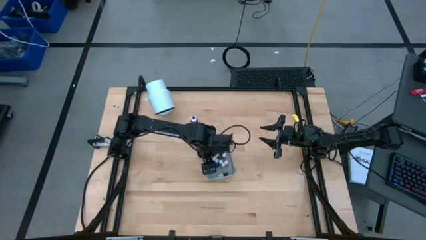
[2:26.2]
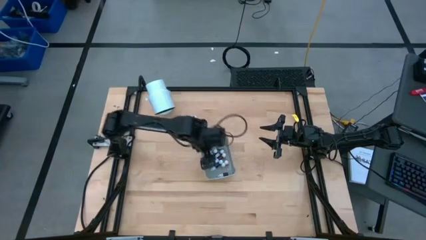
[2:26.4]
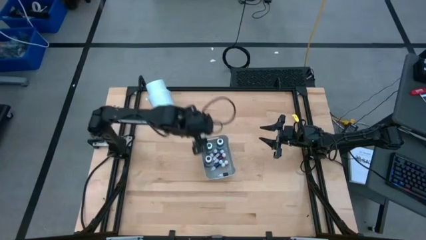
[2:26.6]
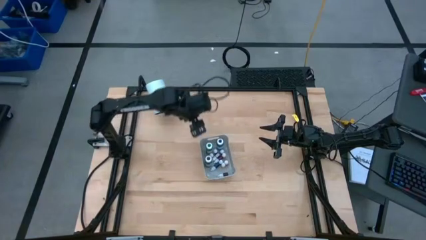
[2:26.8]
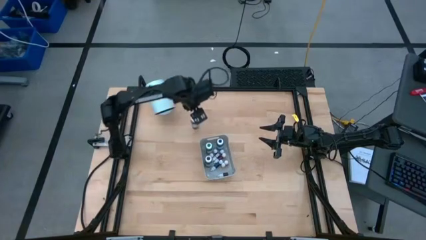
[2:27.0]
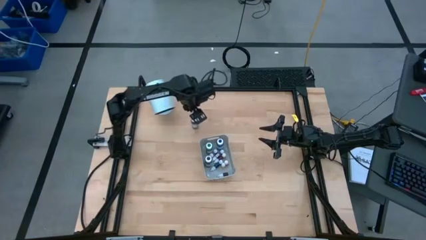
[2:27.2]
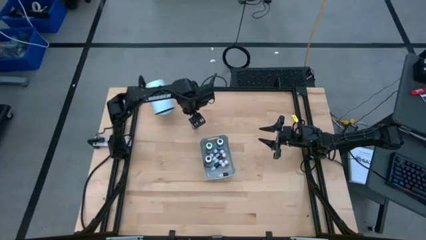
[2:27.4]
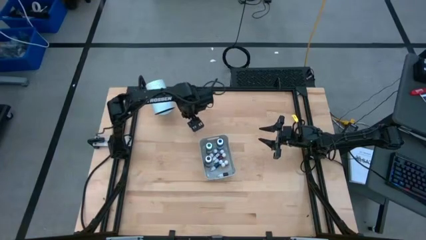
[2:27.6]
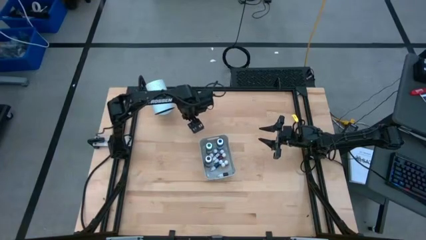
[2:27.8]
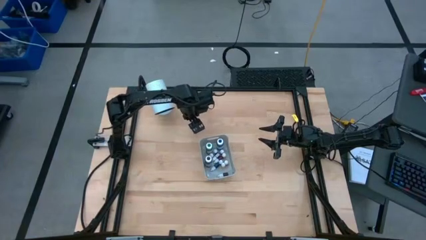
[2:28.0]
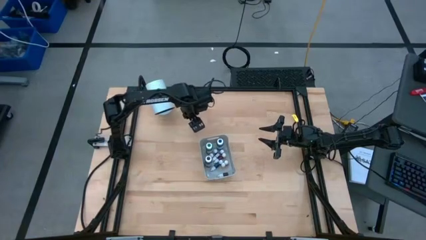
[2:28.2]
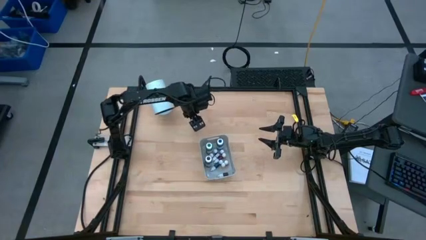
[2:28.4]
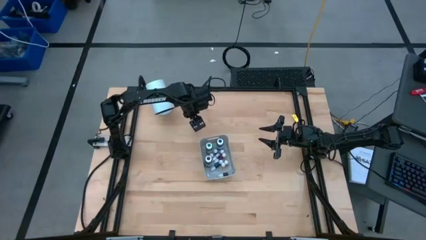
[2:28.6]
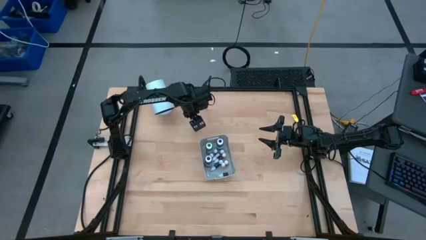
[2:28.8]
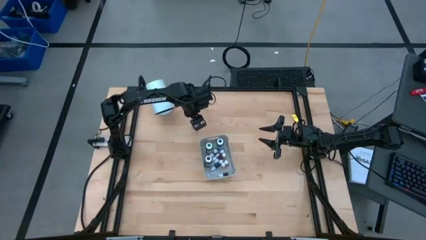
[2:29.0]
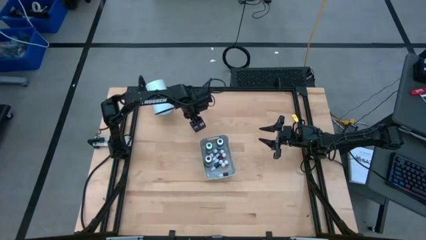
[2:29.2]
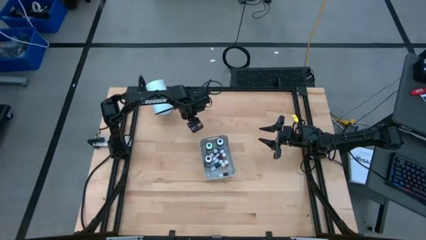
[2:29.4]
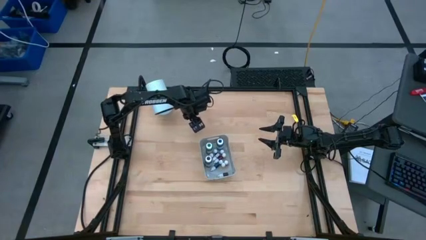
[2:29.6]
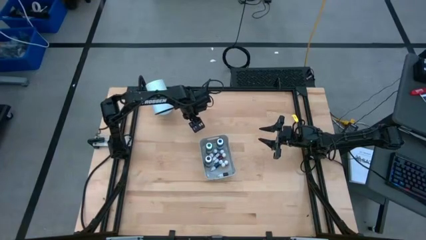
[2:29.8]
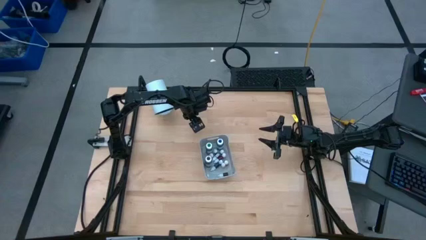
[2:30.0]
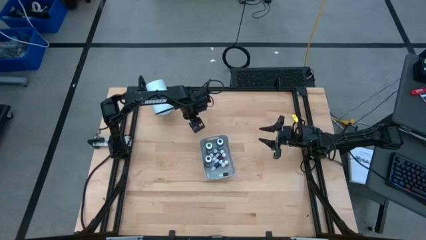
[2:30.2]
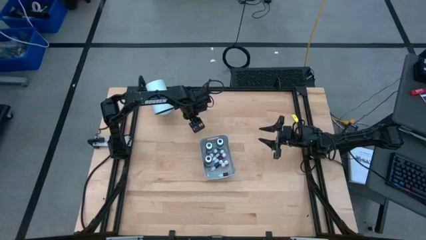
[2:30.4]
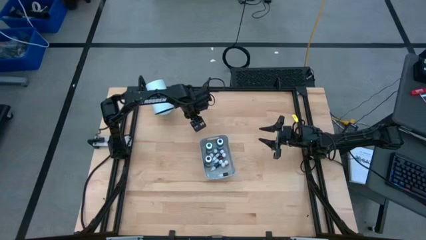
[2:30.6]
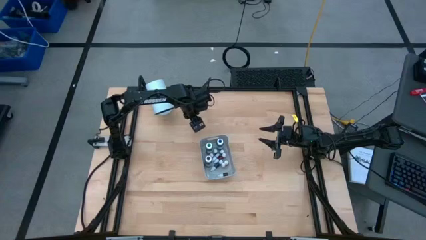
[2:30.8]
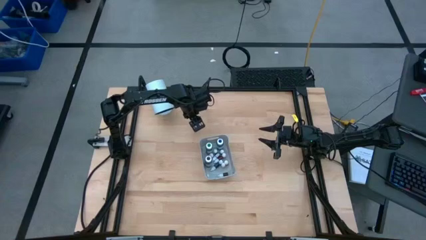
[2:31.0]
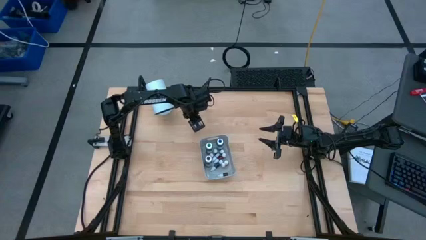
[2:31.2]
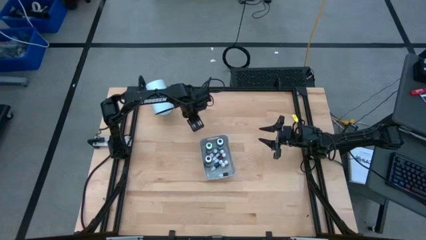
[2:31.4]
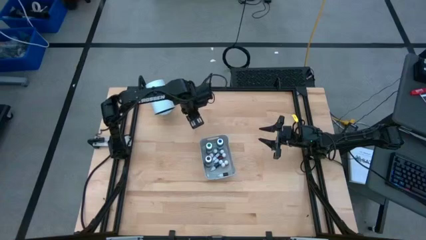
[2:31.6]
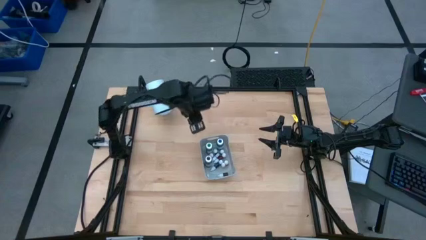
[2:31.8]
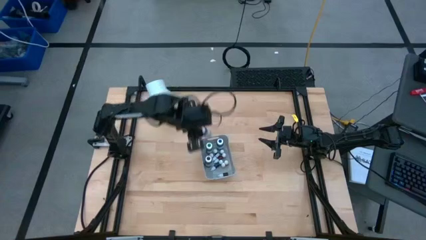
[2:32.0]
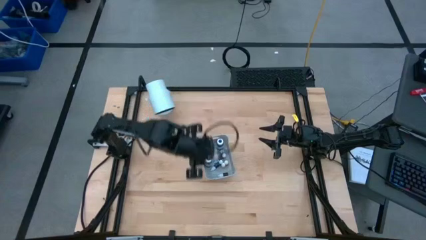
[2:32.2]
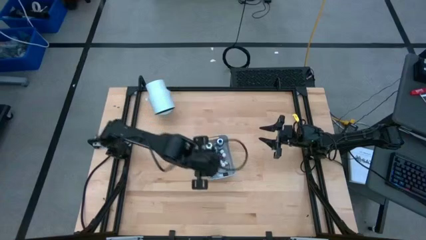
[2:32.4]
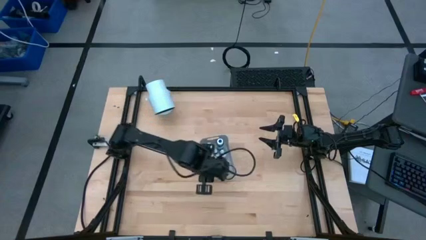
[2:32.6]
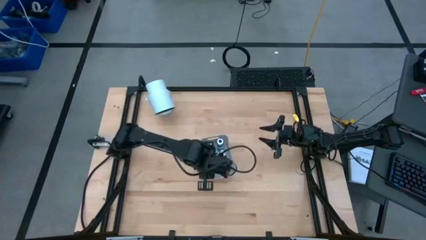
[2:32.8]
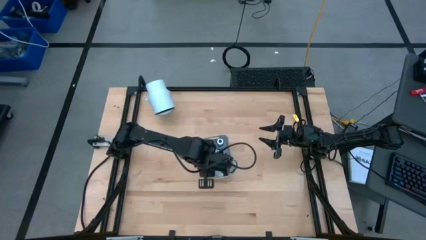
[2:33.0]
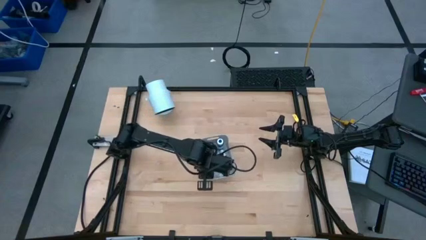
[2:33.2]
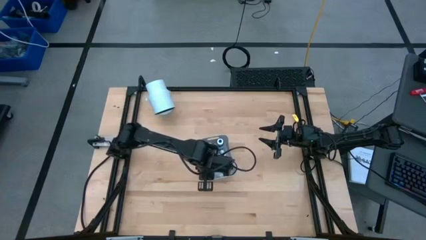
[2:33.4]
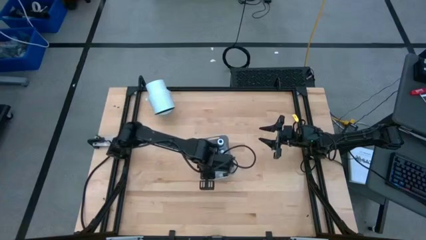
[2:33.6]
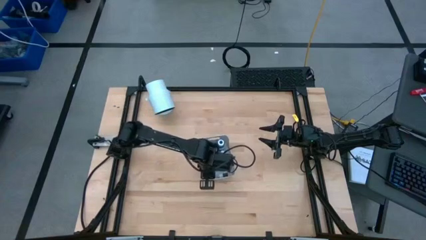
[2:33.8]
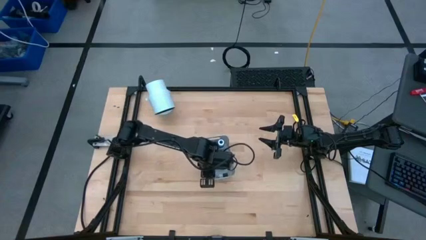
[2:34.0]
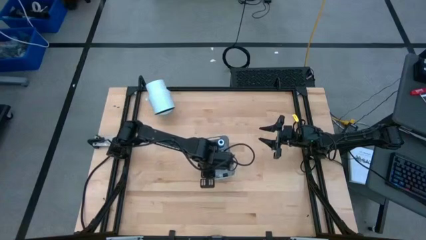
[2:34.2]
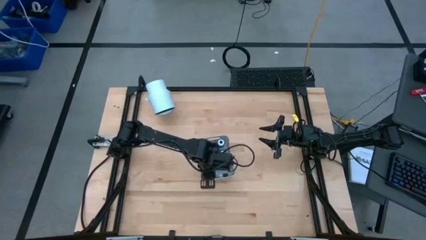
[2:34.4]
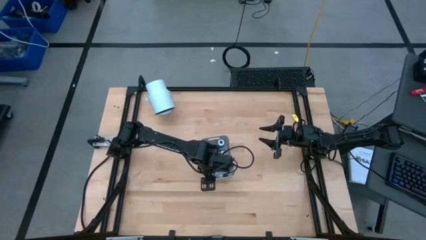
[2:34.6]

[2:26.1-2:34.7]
Task: Pick & Place food coloring
Put the purple food coloring bottle into the bin

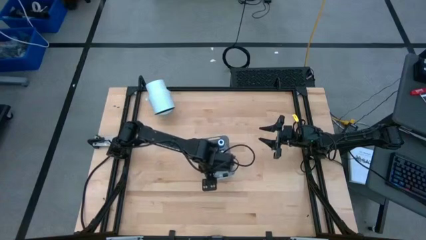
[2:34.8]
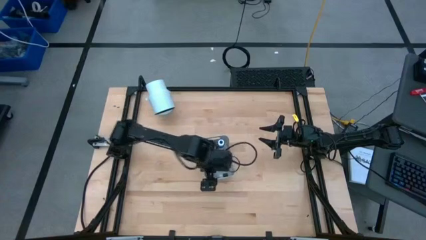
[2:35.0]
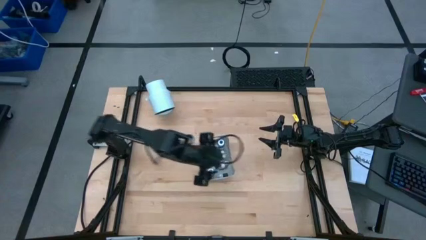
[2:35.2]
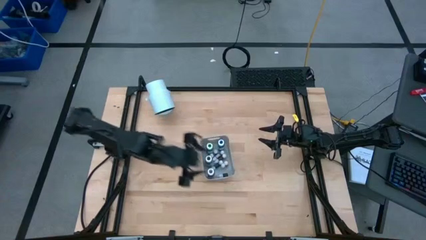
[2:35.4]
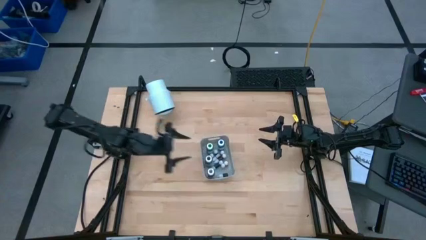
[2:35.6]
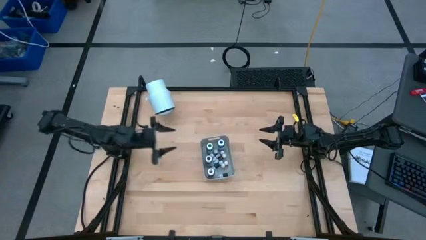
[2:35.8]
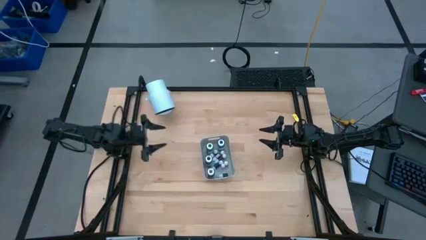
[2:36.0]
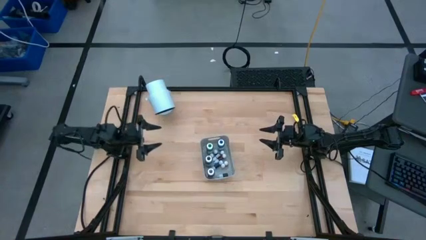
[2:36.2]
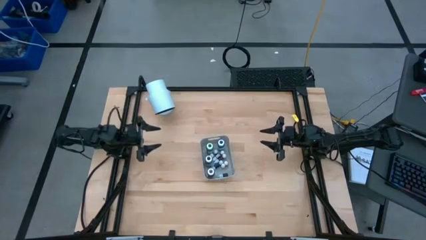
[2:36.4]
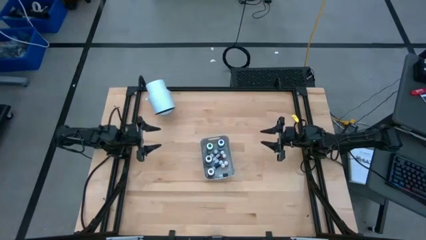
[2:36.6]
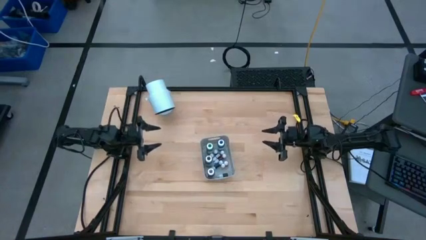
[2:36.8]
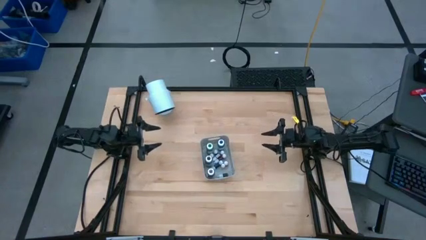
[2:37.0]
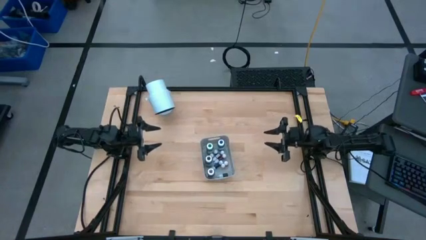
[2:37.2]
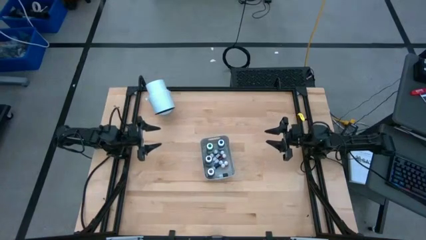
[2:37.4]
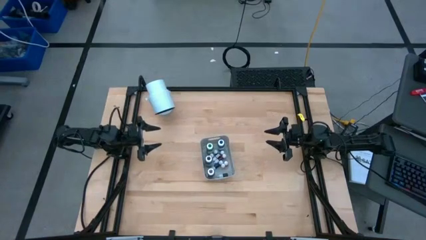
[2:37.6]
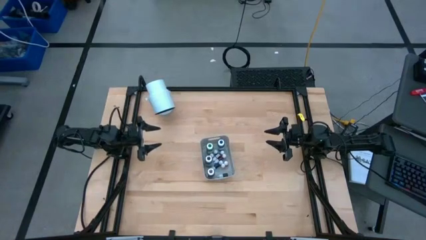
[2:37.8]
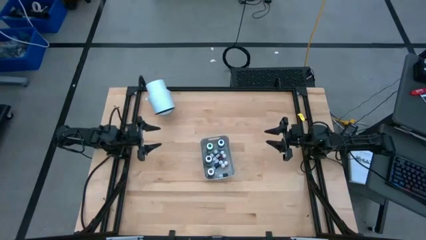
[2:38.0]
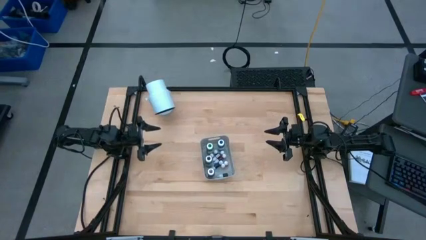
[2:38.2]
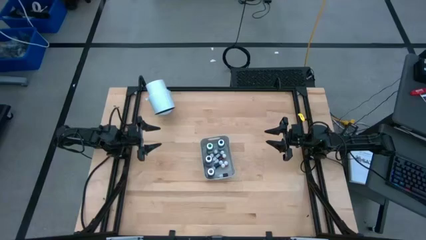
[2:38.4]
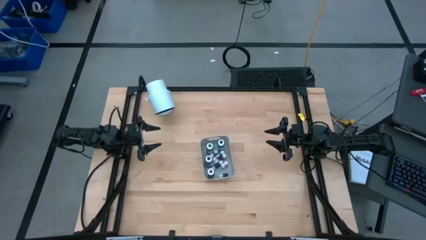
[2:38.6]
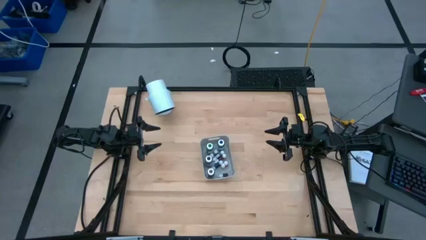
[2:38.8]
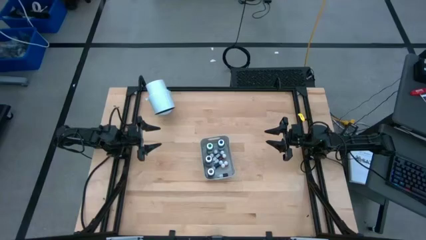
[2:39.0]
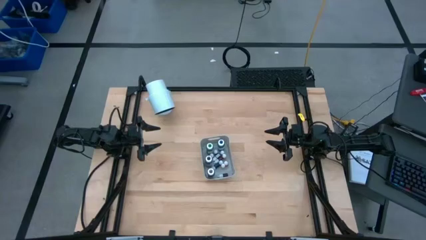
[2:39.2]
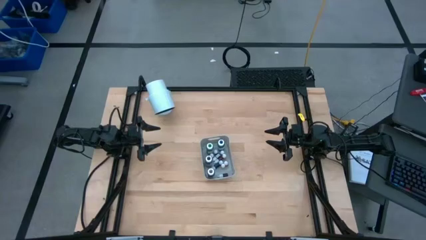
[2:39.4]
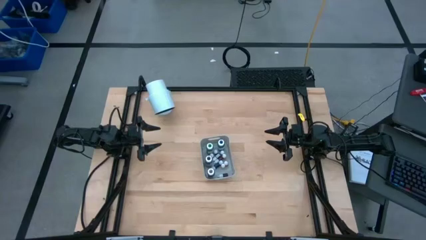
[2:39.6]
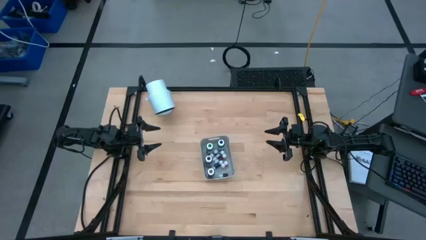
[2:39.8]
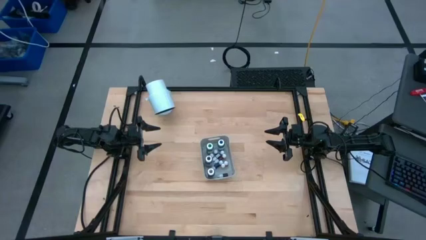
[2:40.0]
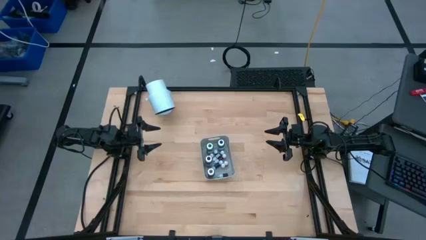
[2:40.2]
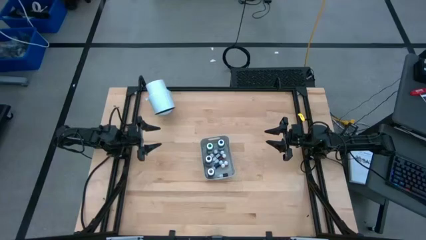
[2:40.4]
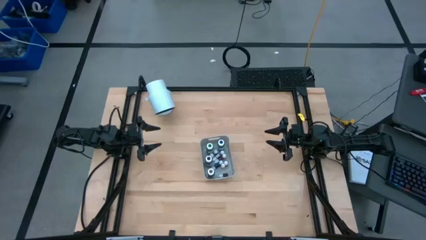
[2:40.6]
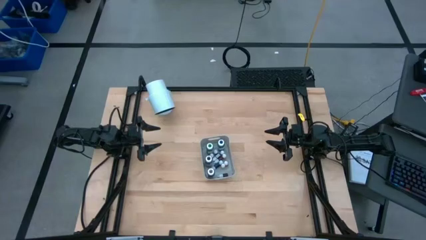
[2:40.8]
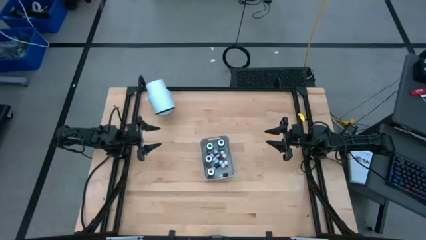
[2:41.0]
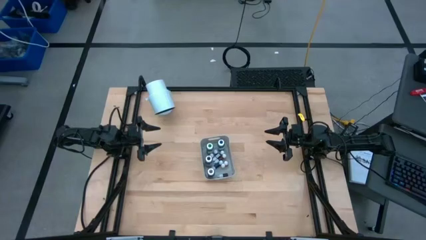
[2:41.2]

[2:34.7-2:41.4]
Return to Home Position
